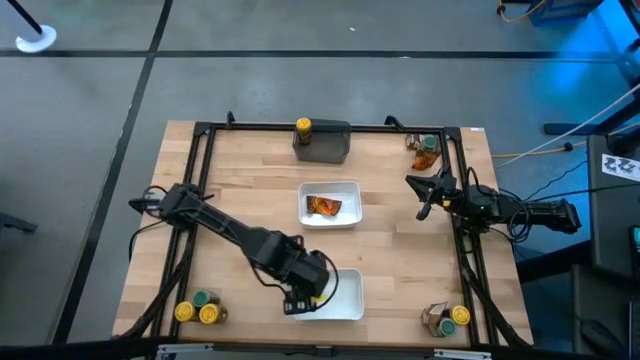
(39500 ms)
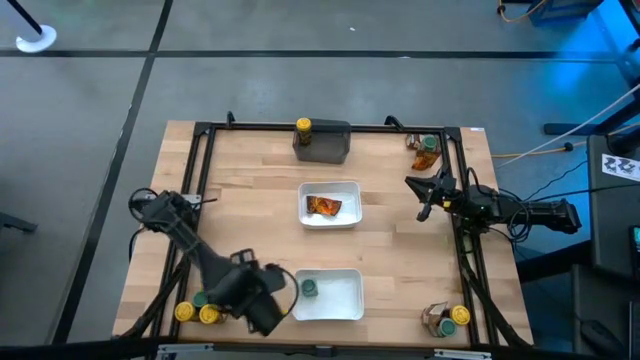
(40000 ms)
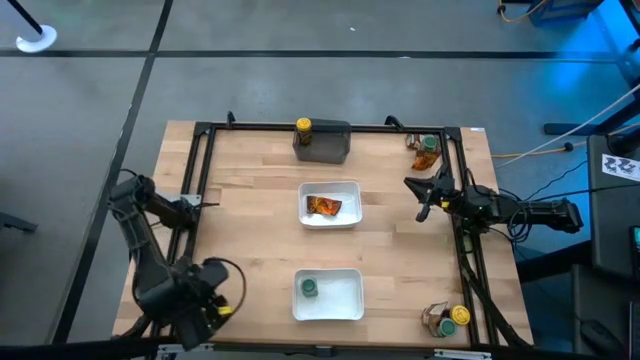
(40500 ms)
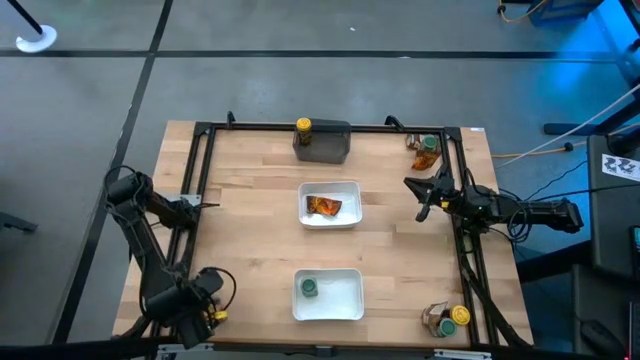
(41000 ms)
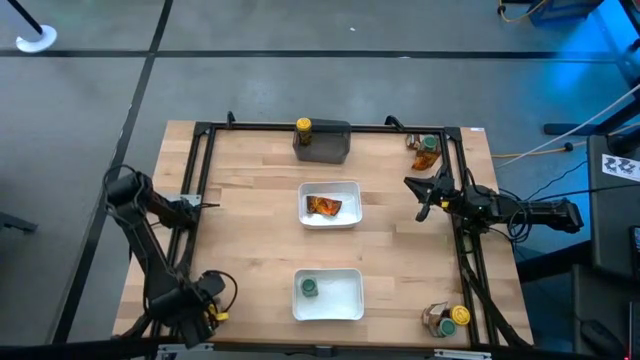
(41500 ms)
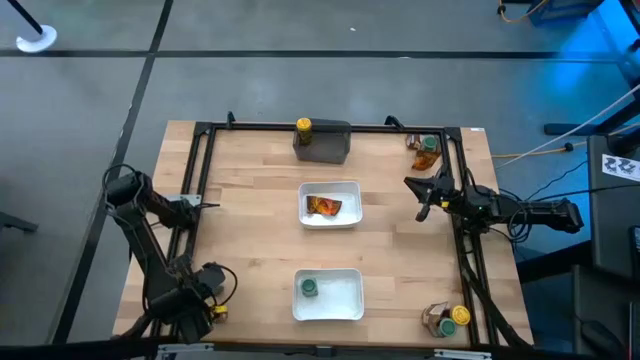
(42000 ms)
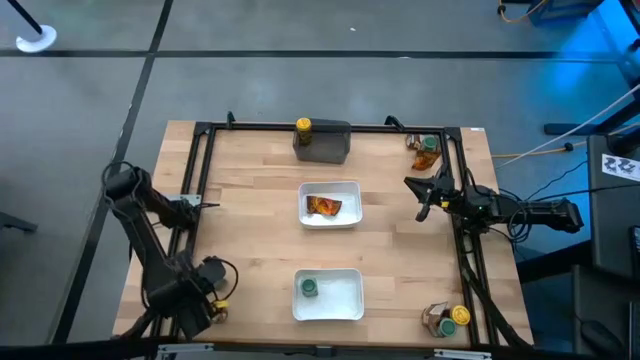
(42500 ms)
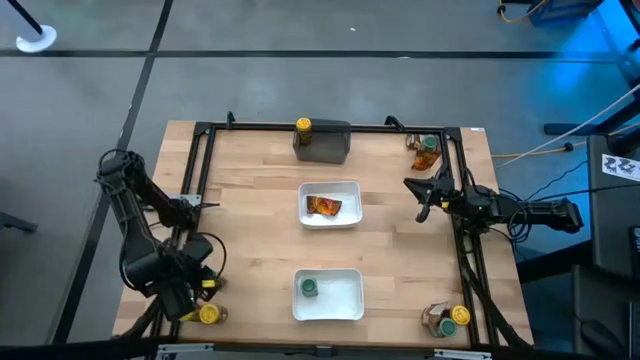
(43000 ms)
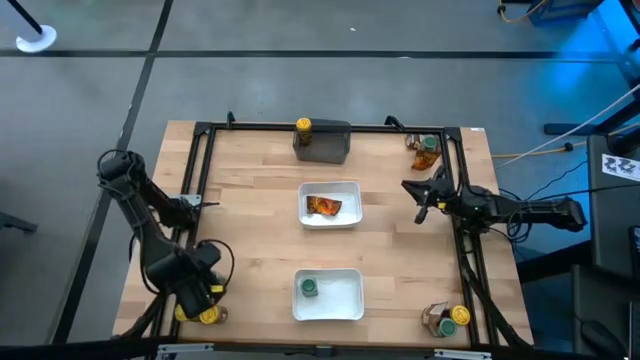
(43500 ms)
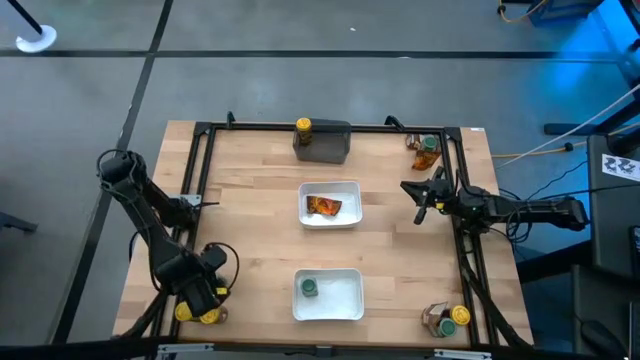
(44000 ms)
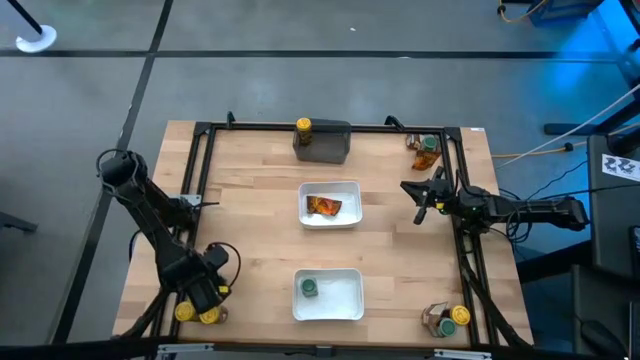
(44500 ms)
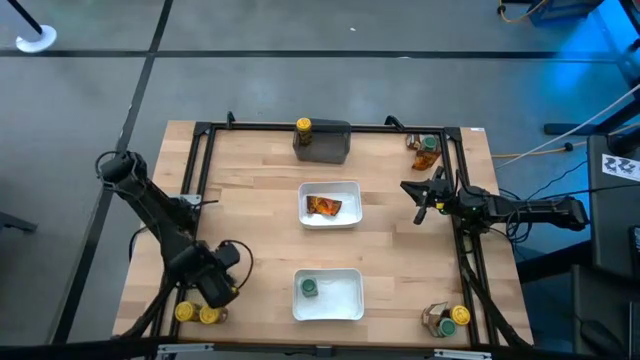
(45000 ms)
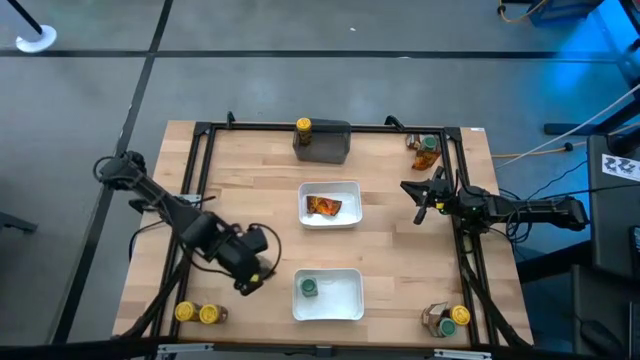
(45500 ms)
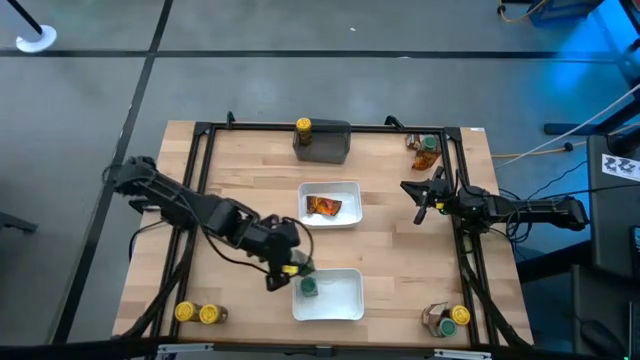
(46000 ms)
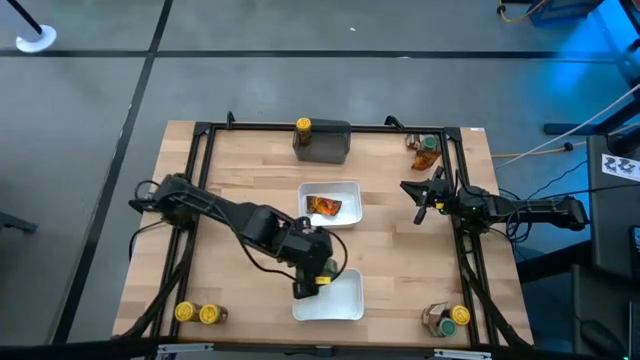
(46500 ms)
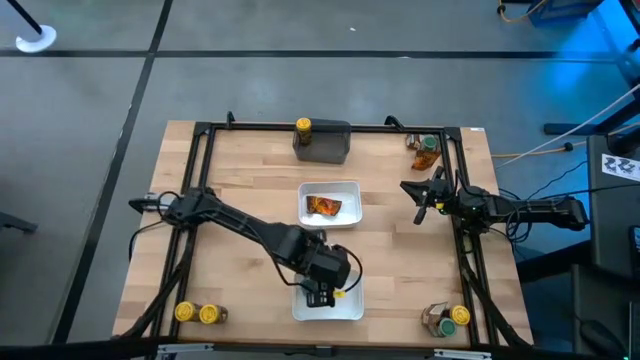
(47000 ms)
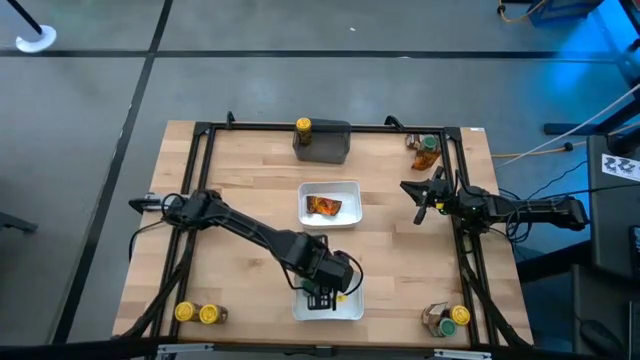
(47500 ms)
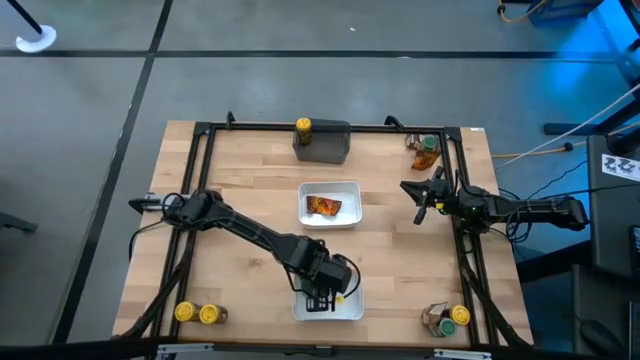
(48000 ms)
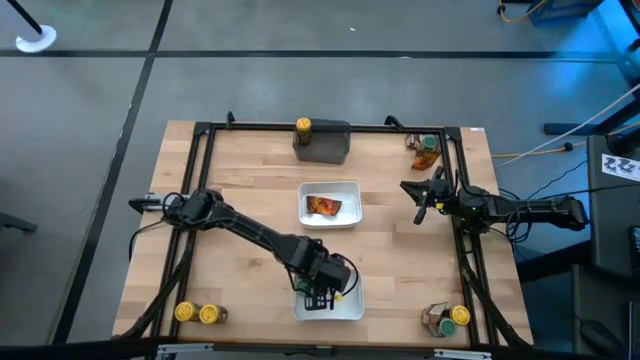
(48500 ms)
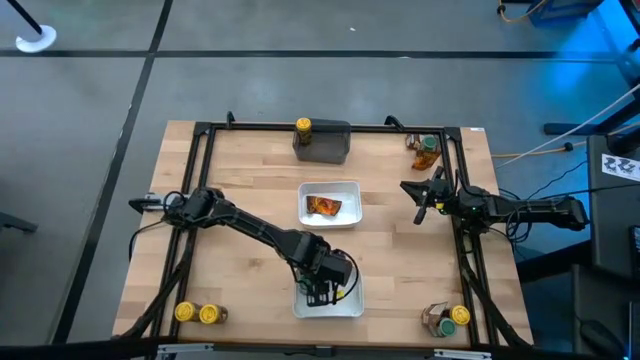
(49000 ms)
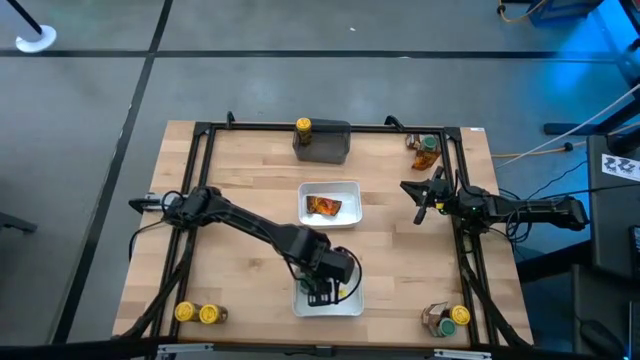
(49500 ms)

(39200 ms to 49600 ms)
Task: Sort spices by type
Put the green seasoning bottle into the bottom white bin

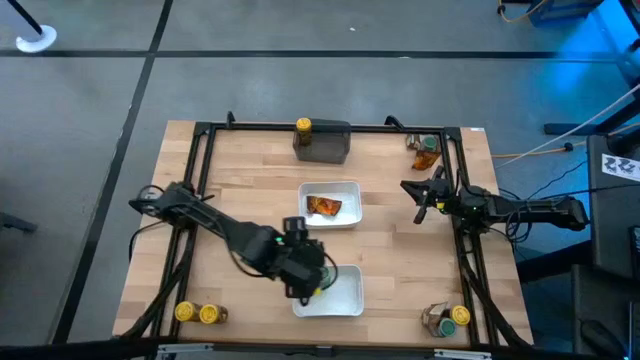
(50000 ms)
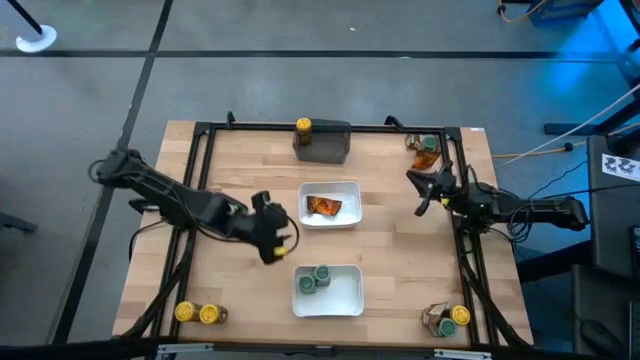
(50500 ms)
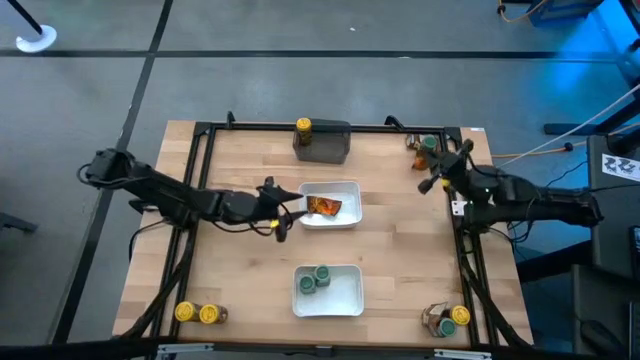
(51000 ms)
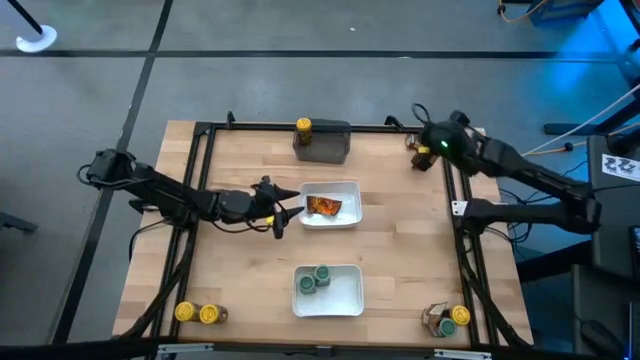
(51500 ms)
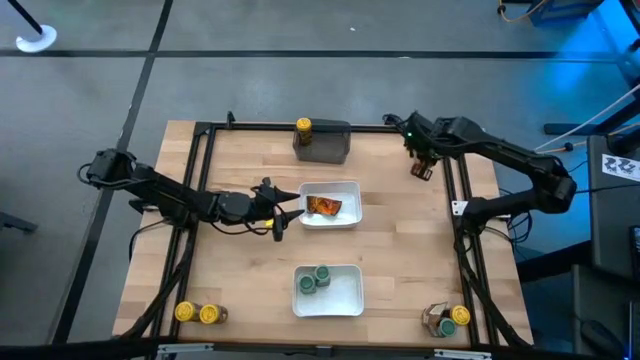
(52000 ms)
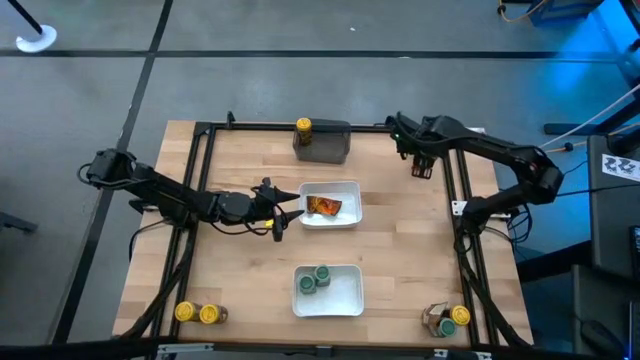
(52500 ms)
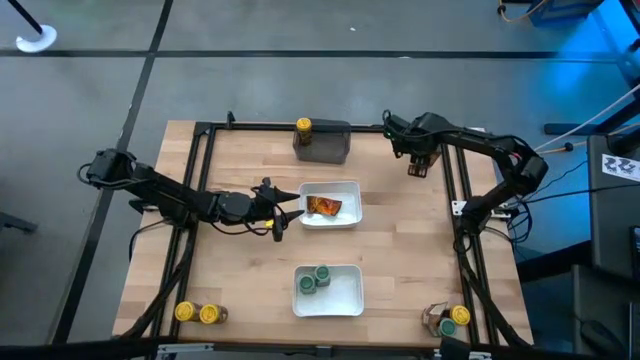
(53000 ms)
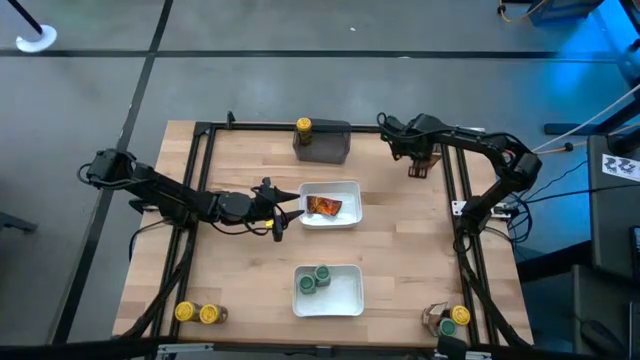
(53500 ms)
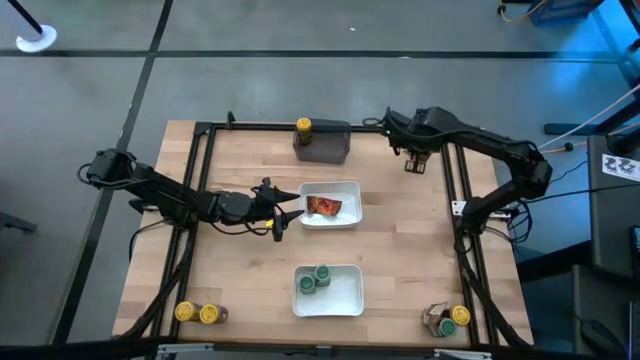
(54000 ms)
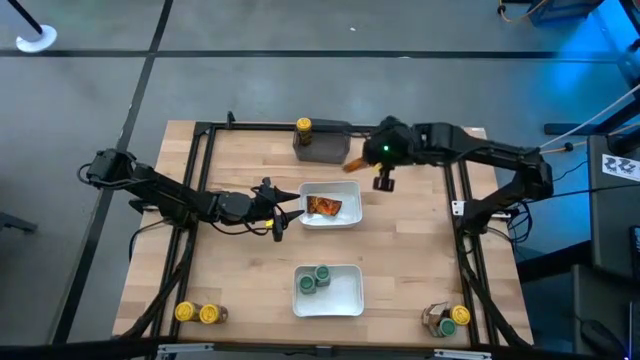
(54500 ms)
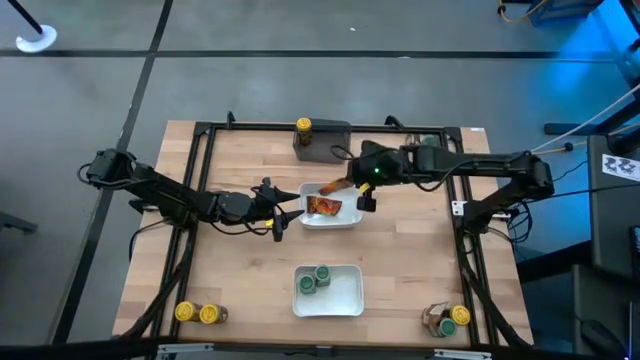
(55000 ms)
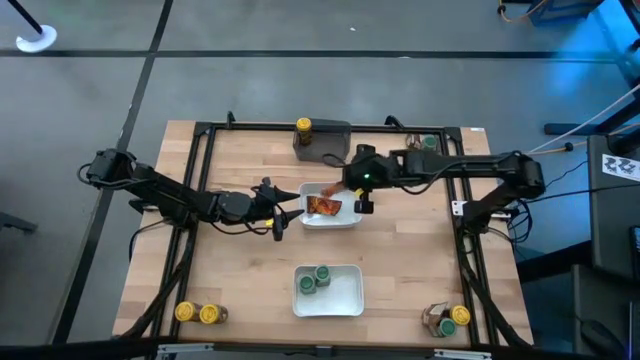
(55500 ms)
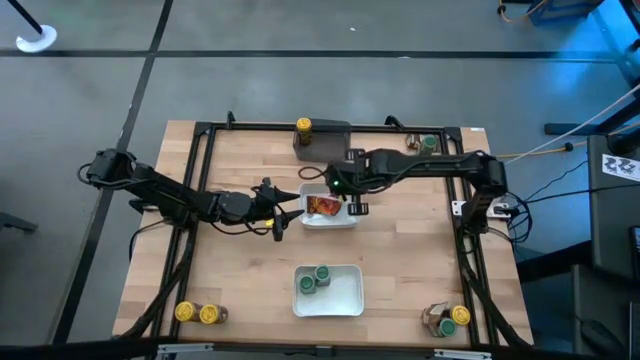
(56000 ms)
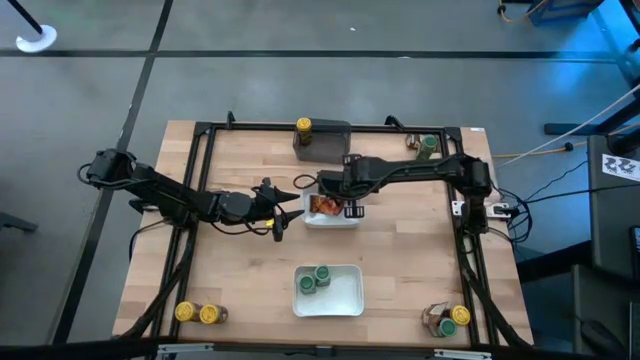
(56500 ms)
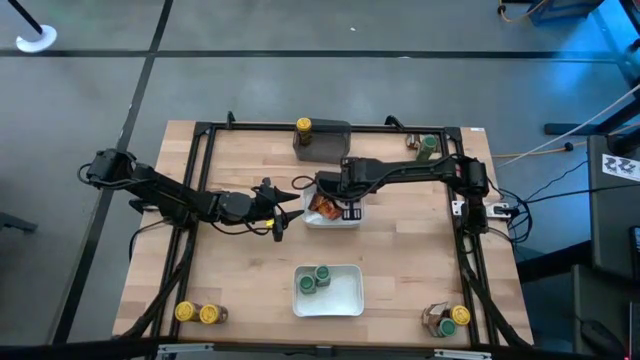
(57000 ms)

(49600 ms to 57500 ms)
Put the orange seasoning bag into the middle white bin

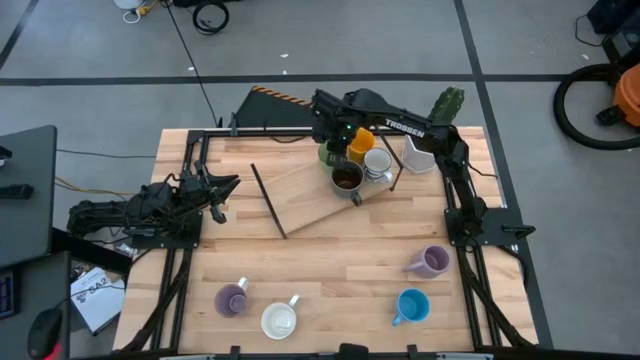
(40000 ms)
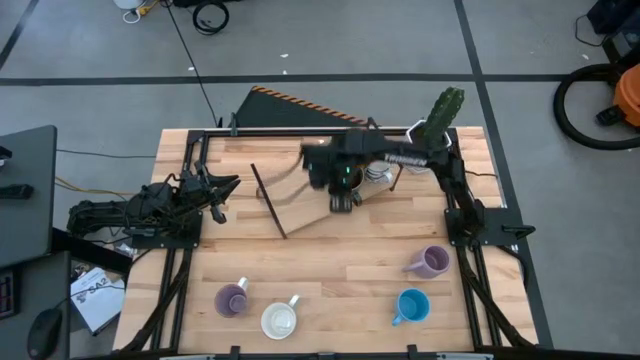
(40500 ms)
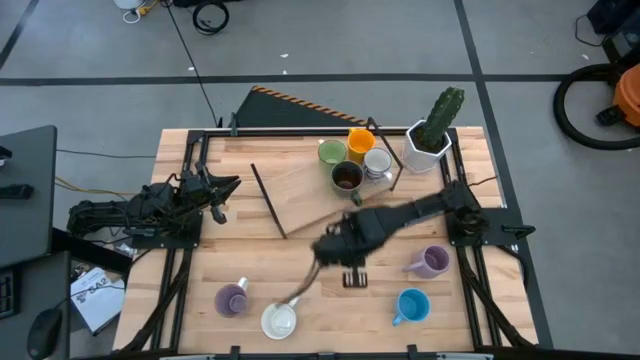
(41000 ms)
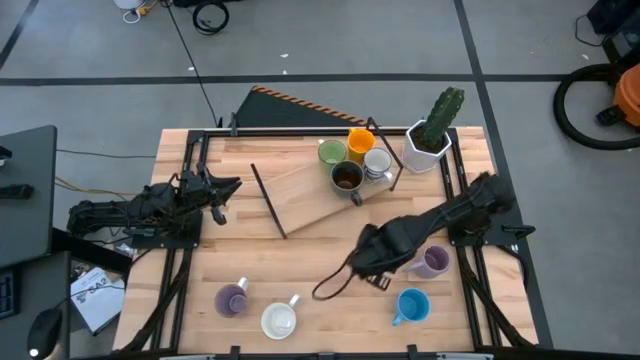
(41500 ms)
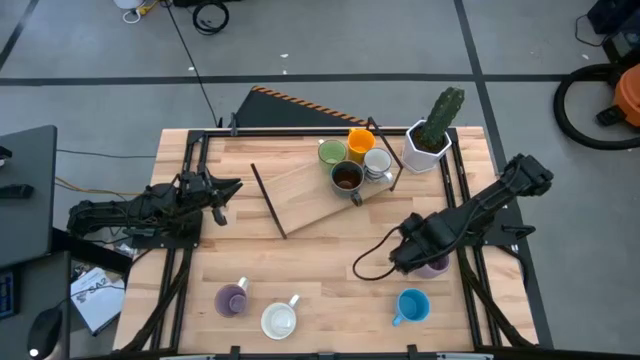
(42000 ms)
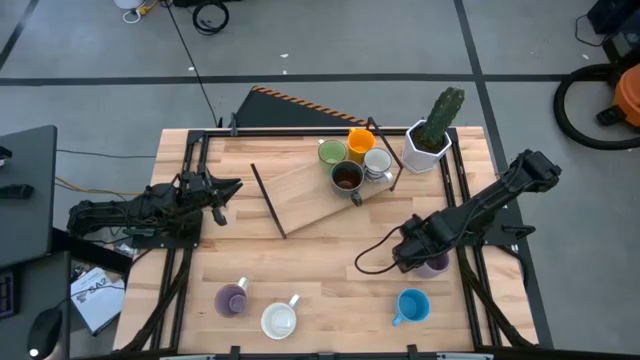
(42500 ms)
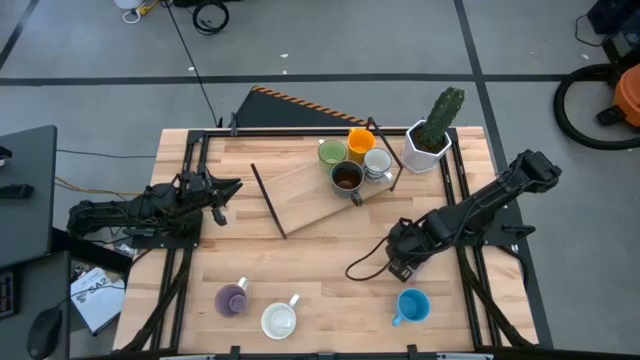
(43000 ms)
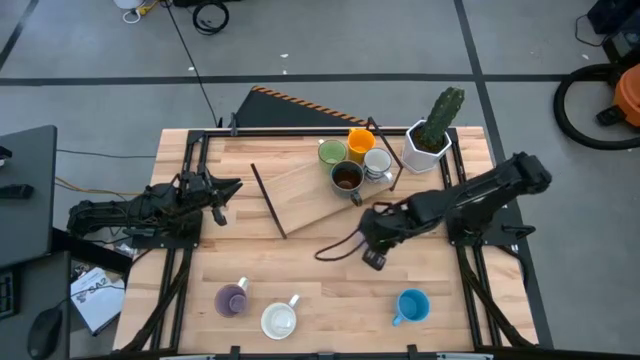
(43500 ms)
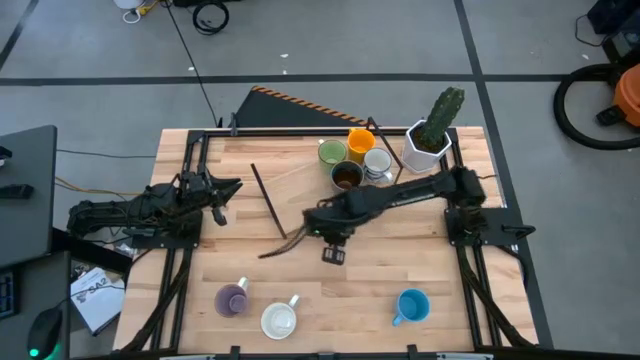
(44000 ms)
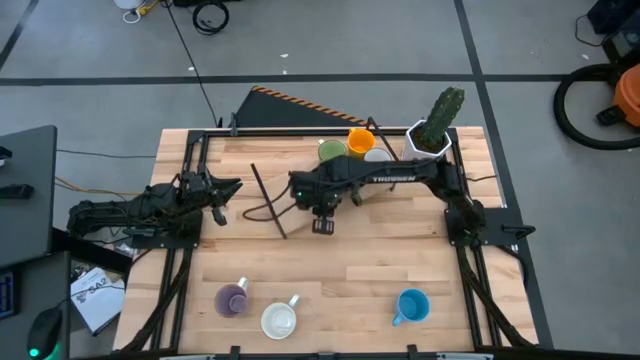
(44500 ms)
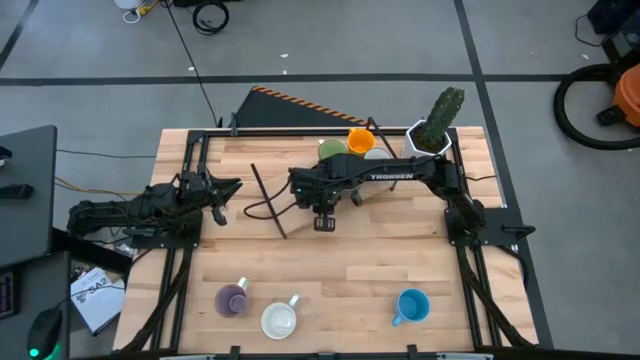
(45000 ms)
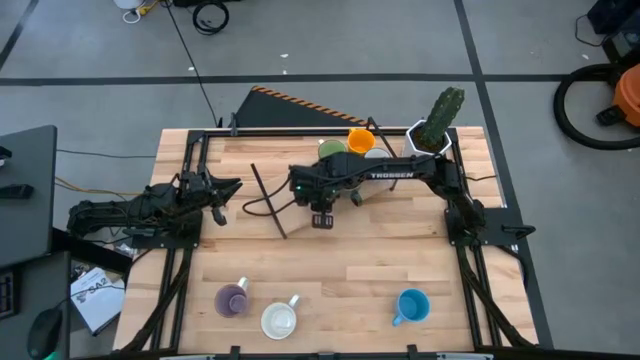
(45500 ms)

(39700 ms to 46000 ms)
Task: Place coffee mugs
Put the purple mug on the shelf
